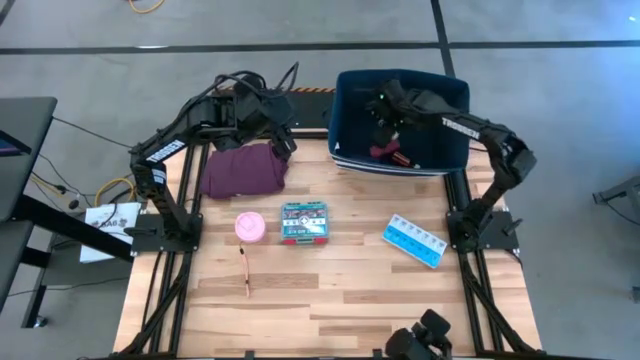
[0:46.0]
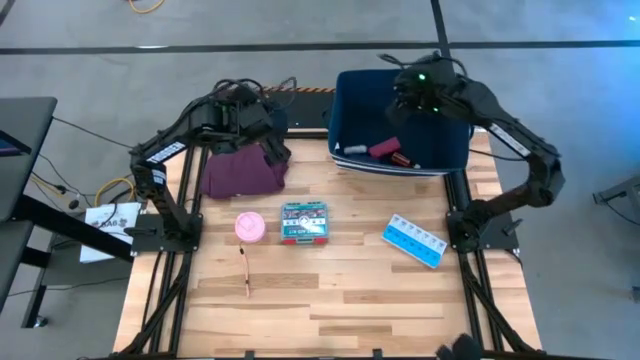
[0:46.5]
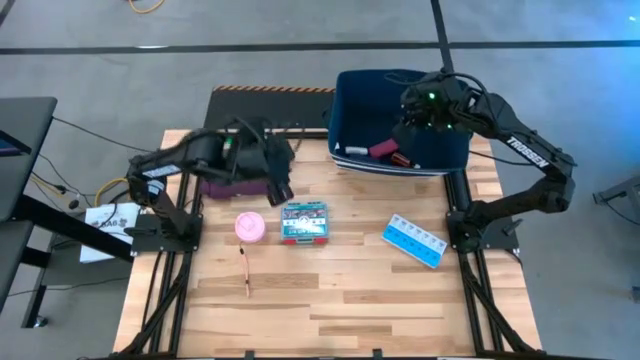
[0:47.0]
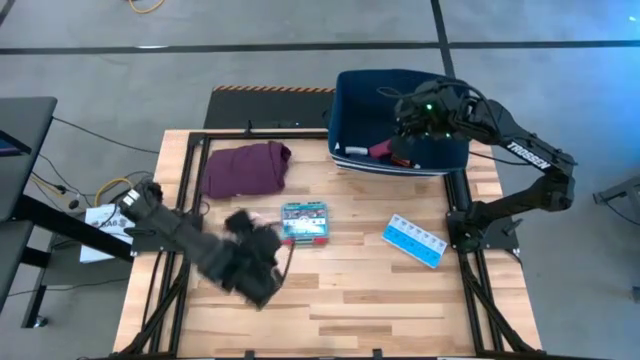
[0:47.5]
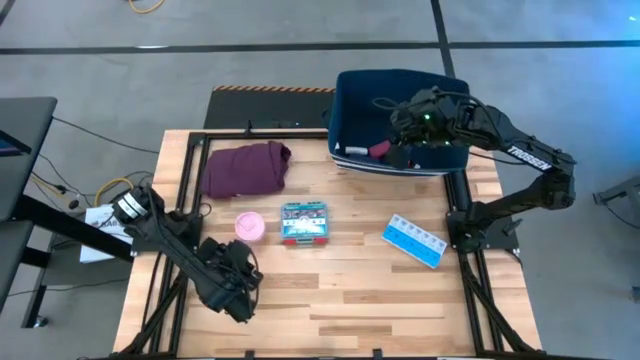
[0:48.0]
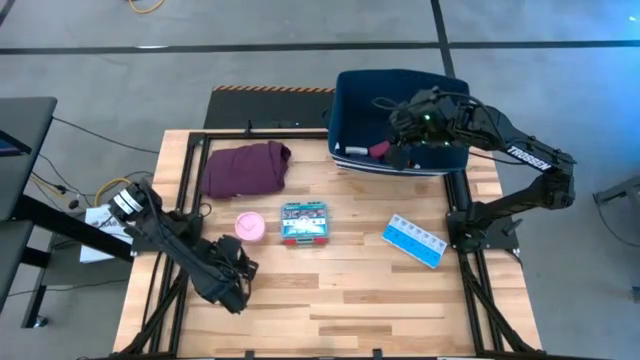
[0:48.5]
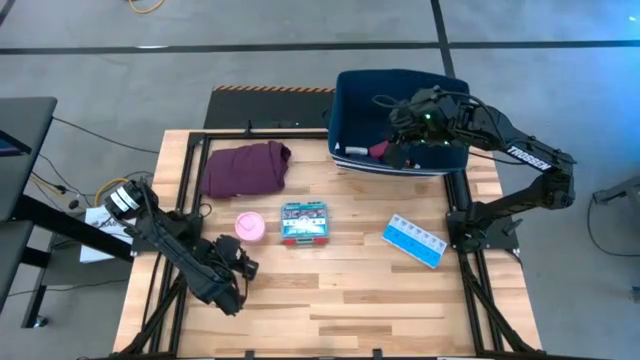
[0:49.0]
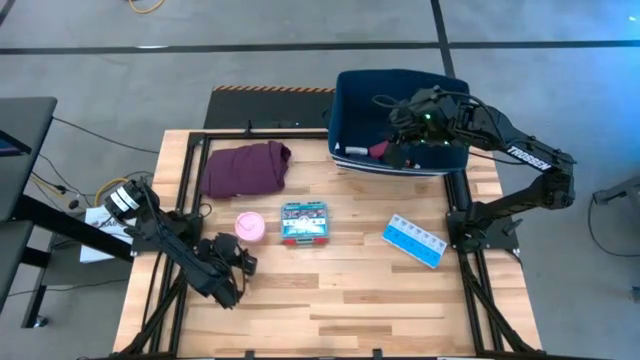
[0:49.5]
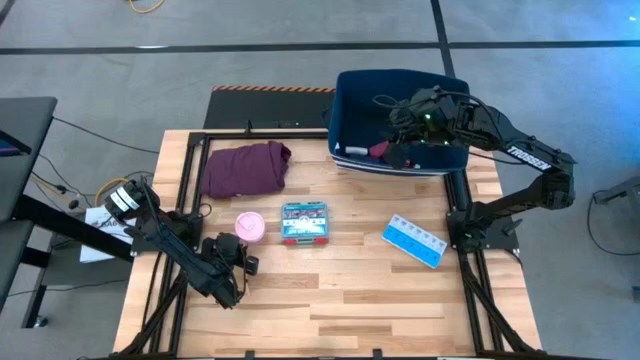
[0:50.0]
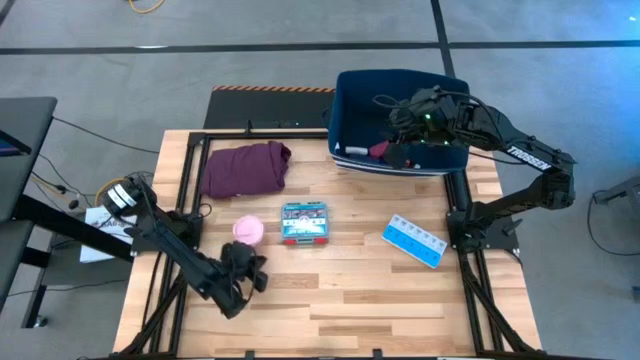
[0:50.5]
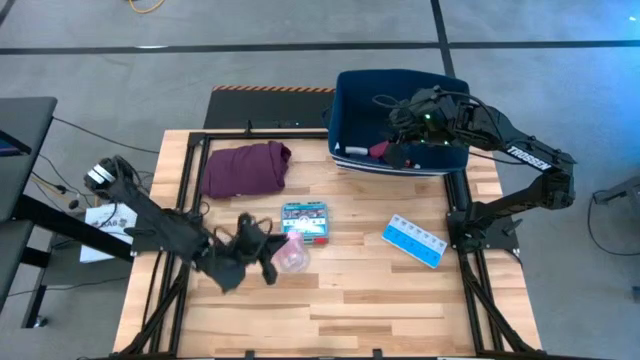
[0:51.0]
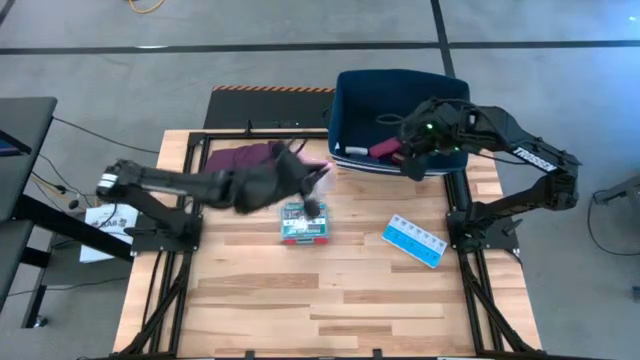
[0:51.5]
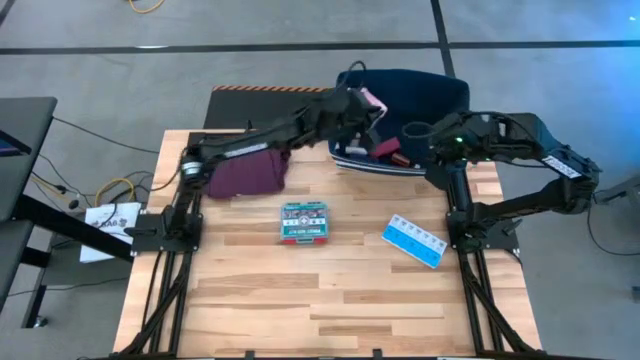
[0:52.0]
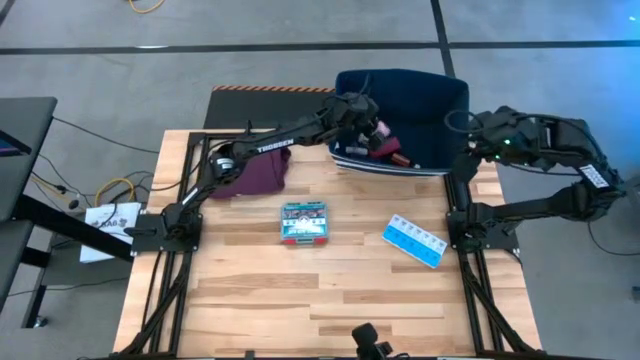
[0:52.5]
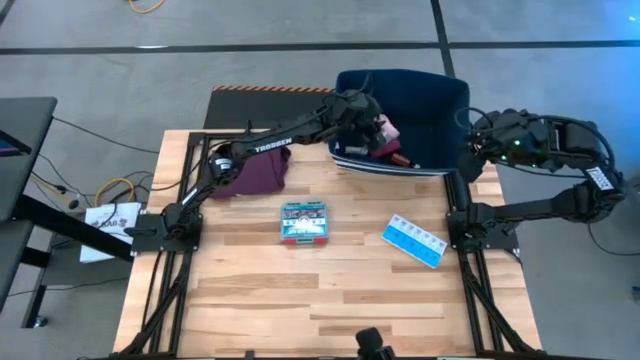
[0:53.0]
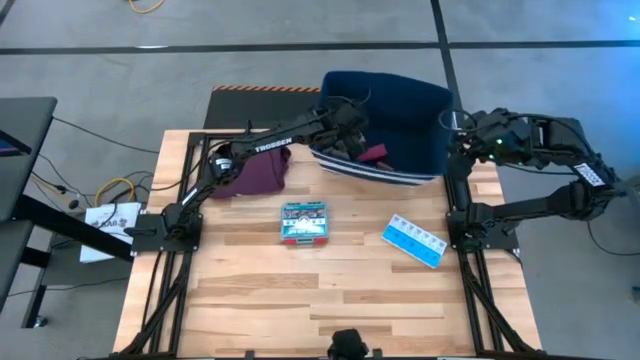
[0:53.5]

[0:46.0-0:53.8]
Task: Pick & place medical supplies in basket/bin
Put the pink pill dispenser into the blue bin

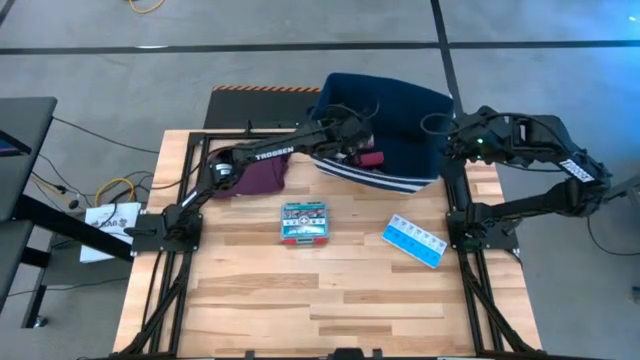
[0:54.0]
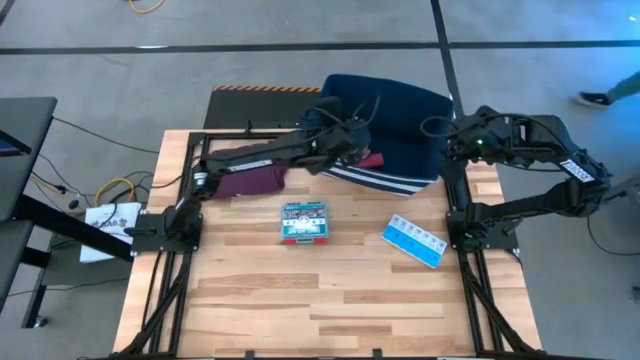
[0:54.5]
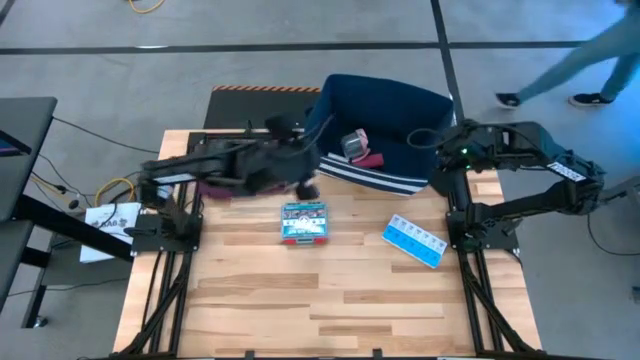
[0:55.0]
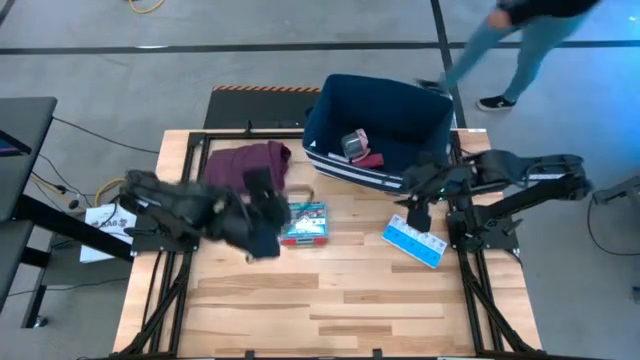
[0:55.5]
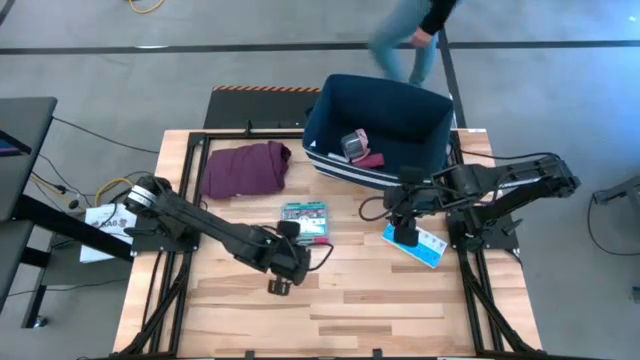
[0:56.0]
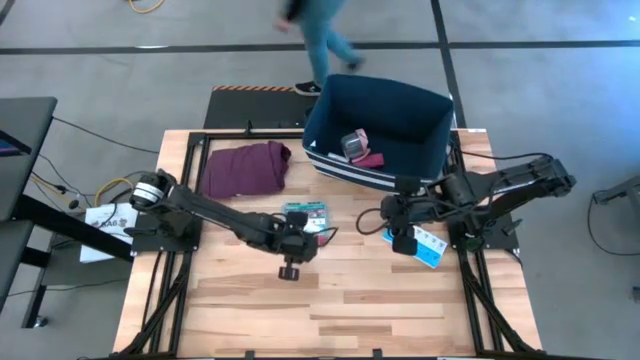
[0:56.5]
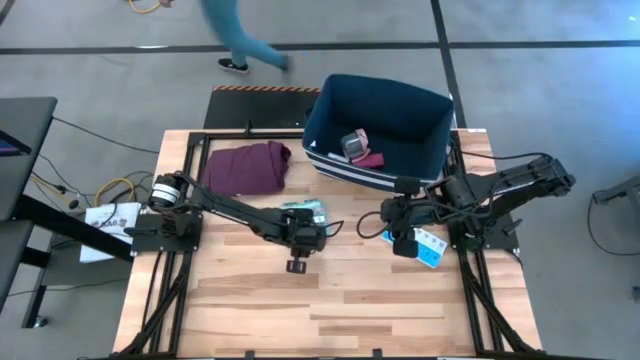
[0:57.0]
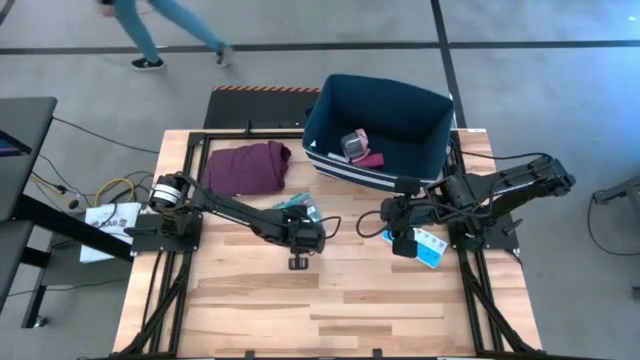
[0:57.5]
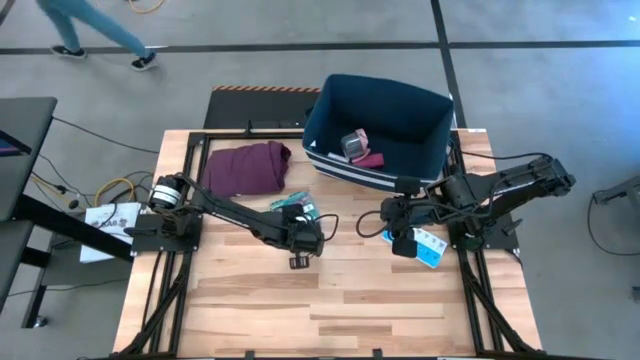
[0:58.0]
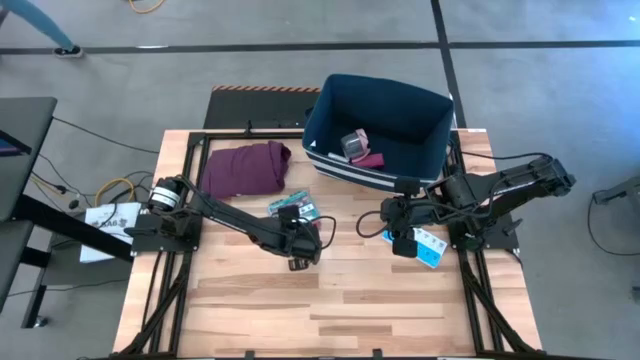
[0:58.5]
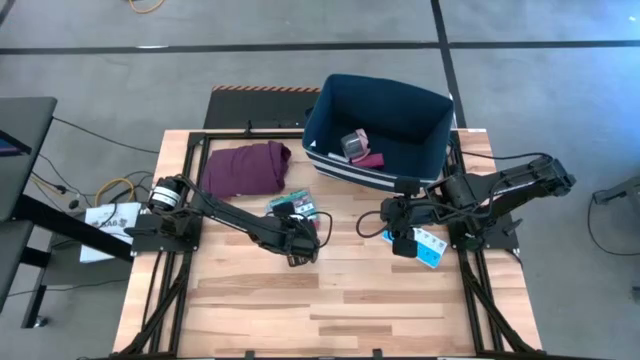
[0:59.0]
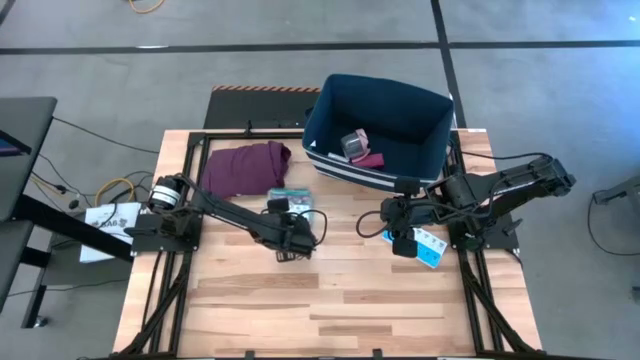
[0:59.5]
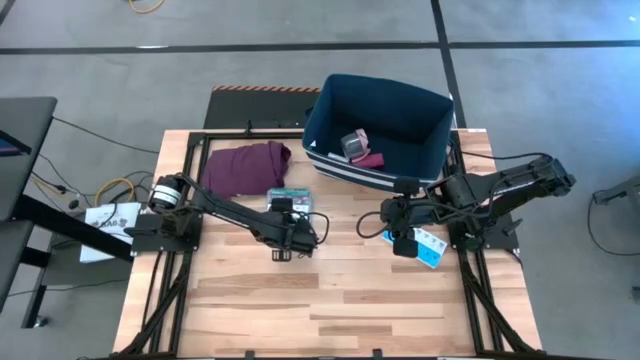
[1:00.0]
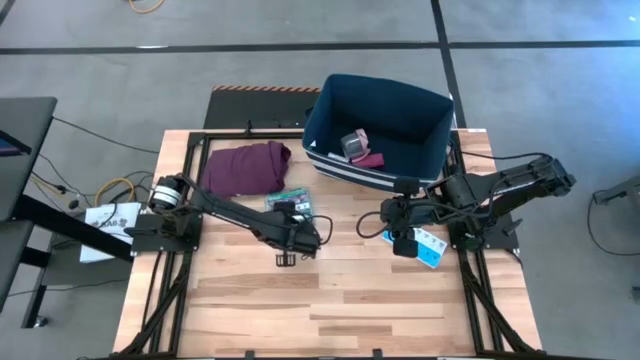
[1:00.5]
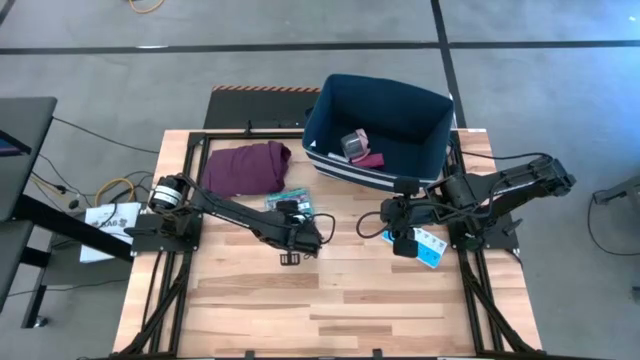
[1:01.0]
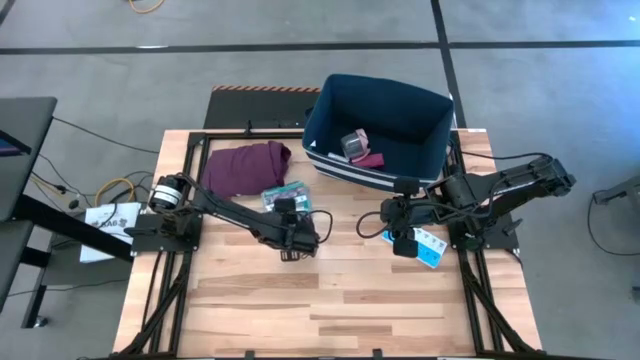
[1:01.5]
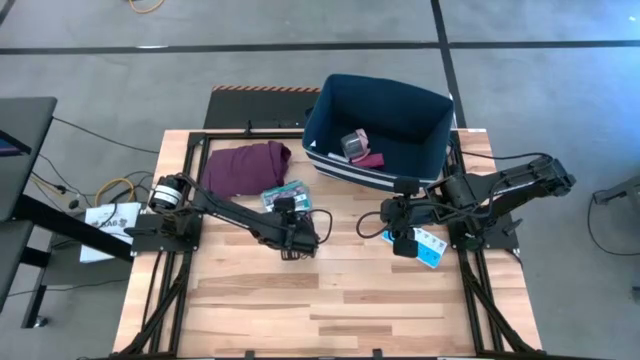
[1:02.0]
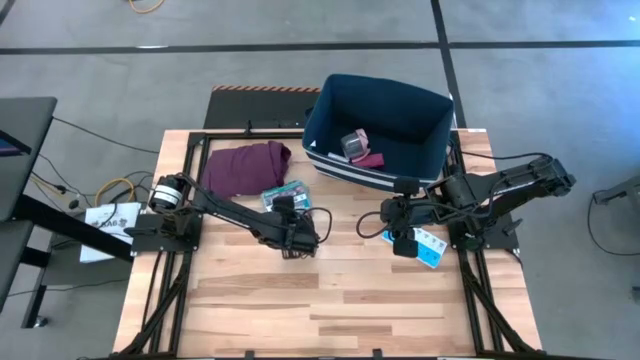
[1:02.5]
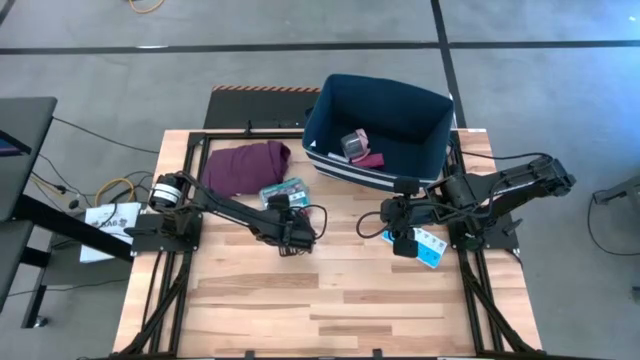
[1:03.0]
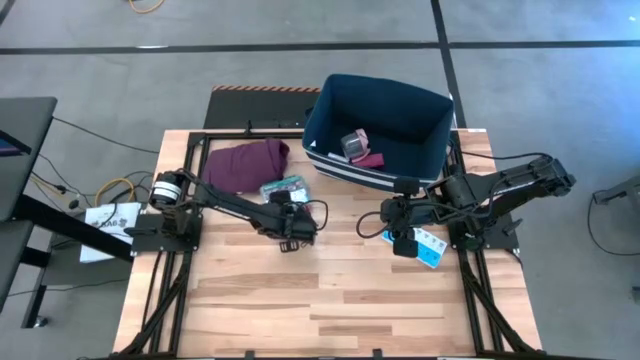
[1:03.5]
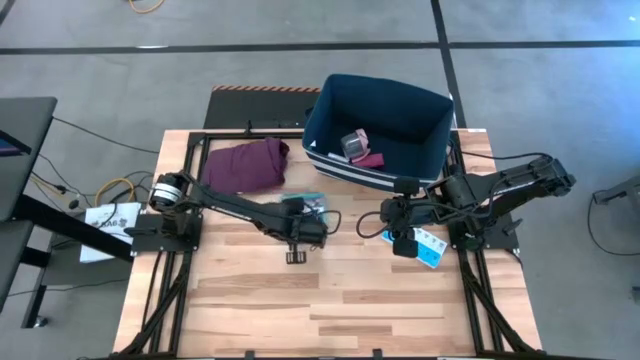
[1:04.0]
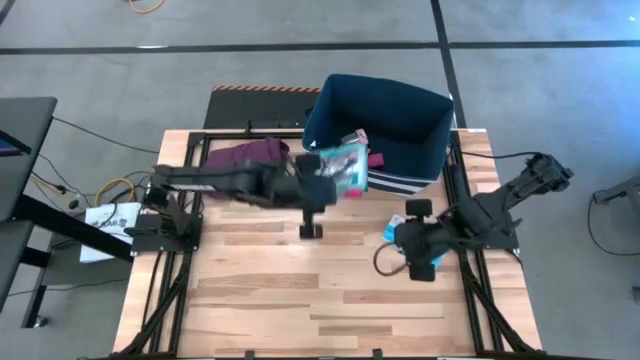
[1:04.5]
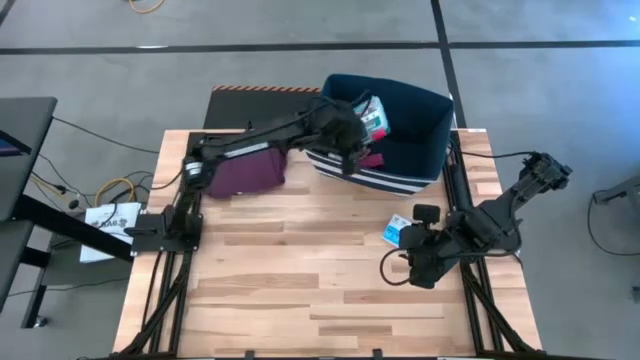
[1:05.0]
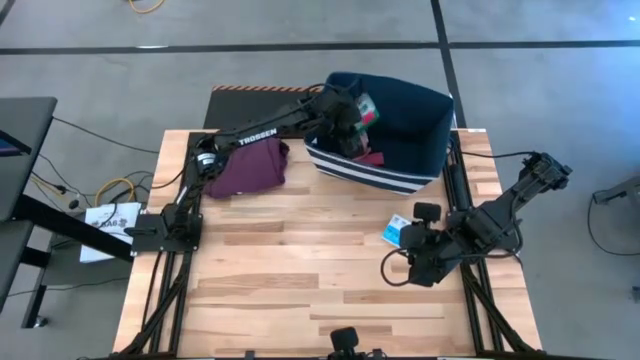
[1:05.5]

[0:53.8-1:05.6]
Put the green first aid kit into the blue bin

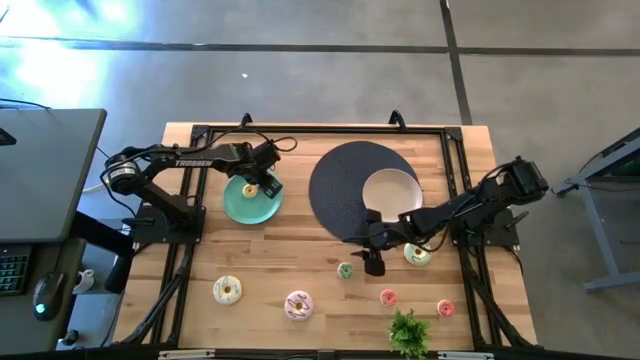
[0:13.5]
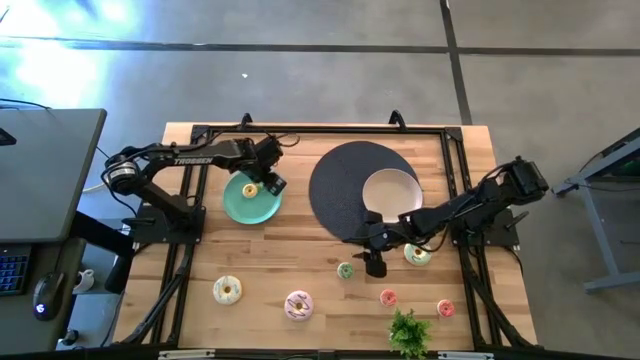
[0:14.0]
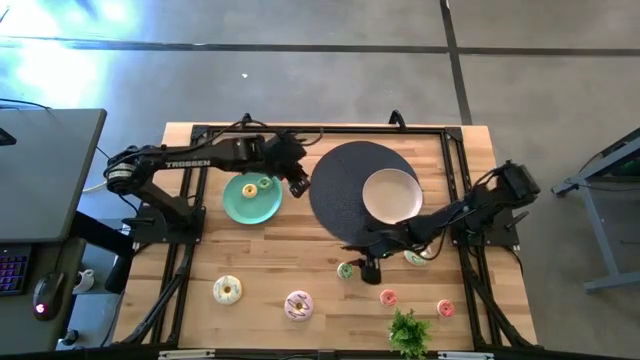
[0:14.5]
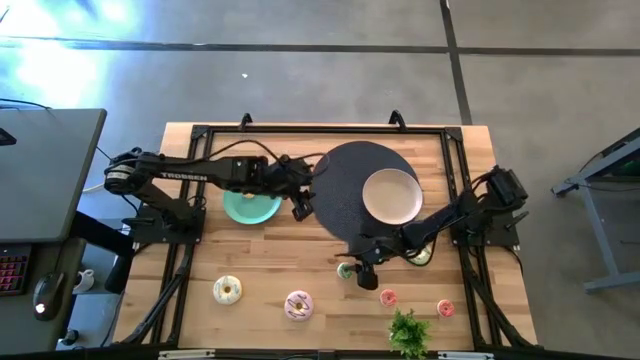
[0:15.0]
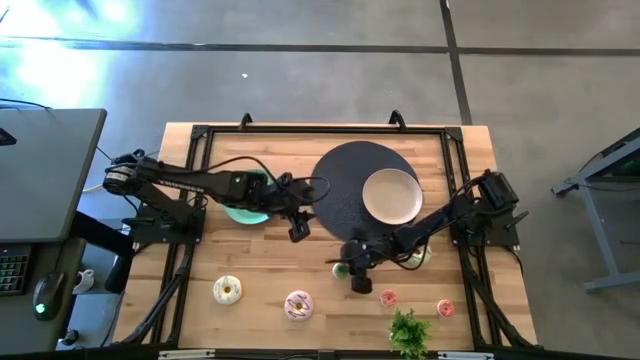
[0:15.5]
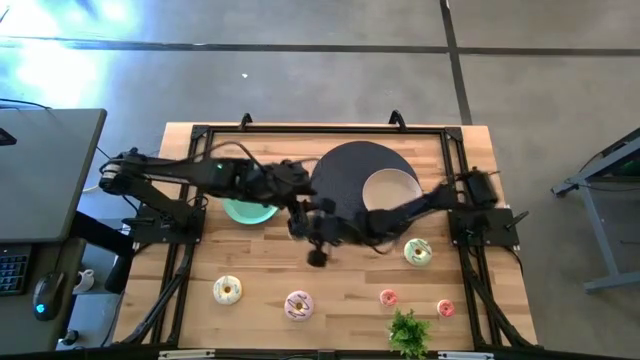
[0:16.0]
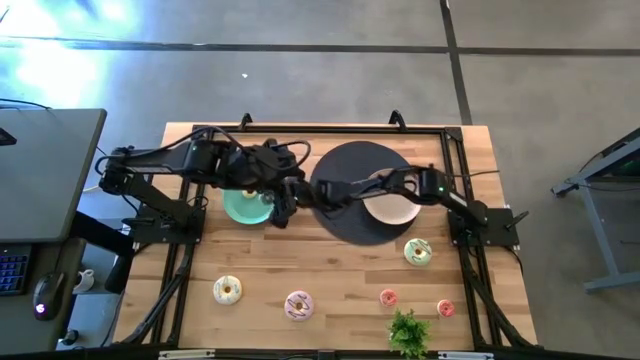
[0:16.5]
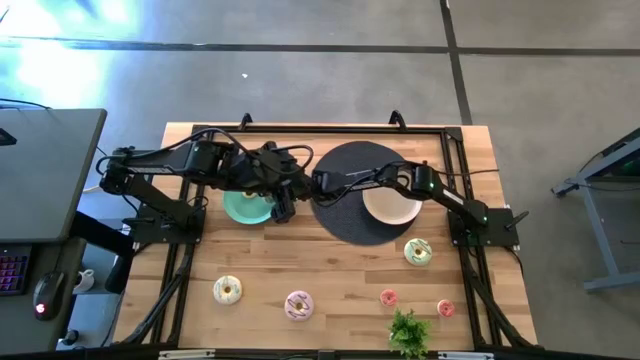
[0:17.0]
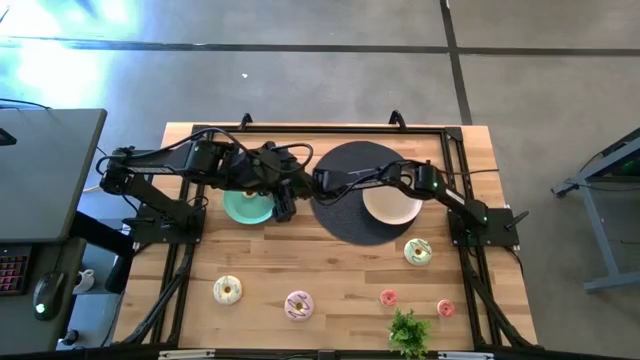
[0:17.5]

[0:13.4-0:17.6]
Task: Pick & Place donuts
Put the small green donut onto the blue plate
